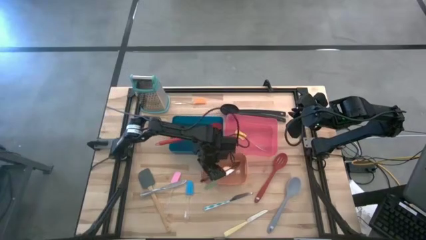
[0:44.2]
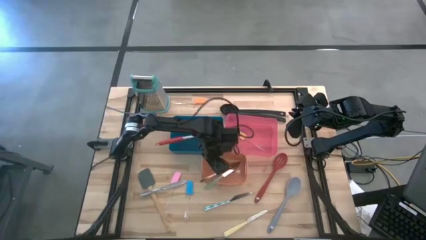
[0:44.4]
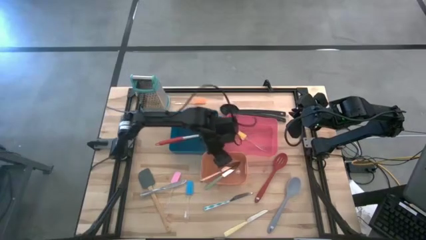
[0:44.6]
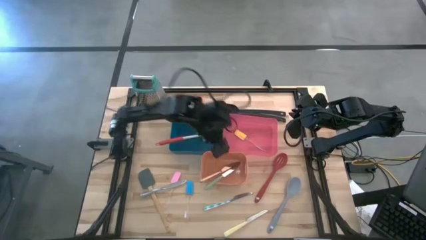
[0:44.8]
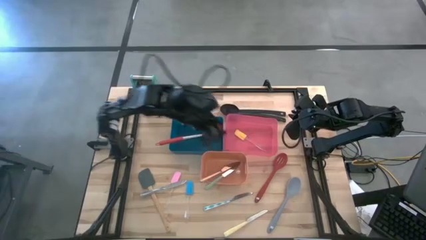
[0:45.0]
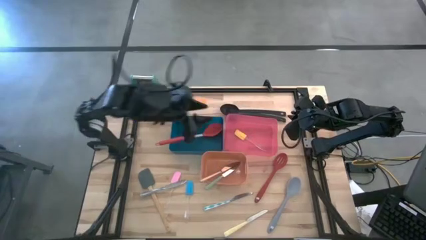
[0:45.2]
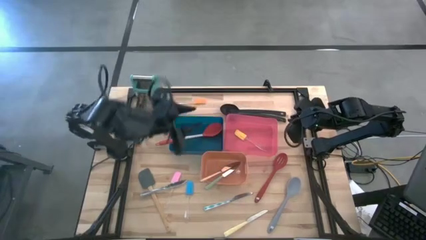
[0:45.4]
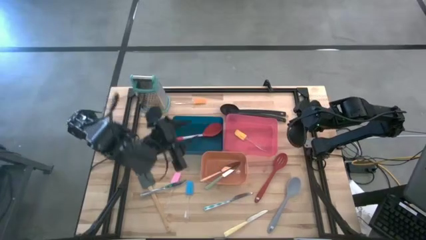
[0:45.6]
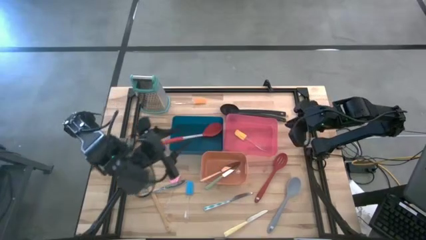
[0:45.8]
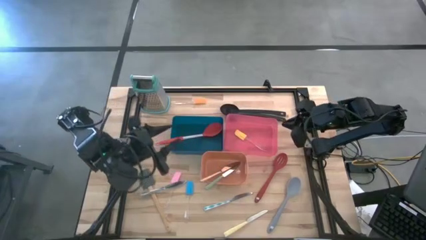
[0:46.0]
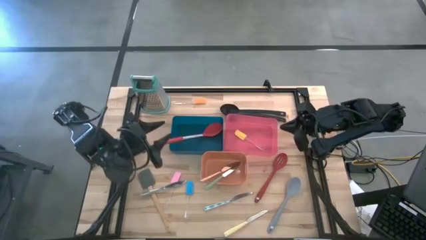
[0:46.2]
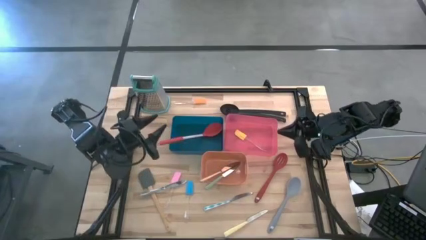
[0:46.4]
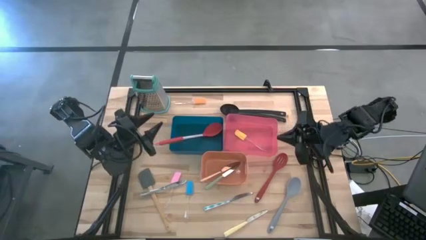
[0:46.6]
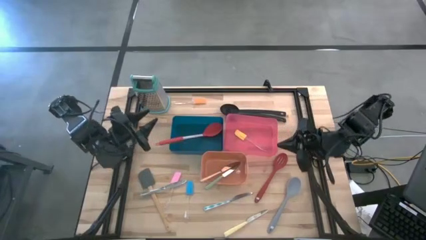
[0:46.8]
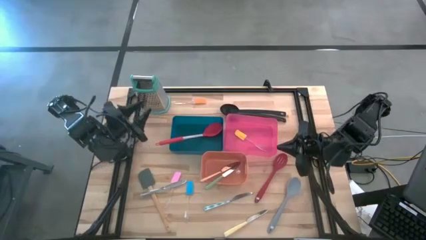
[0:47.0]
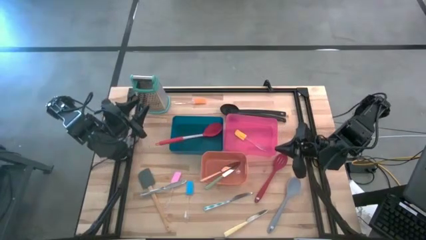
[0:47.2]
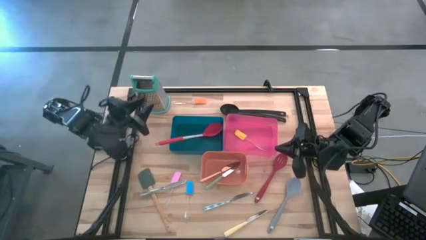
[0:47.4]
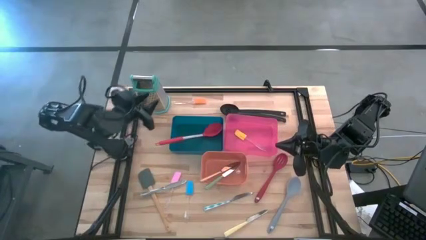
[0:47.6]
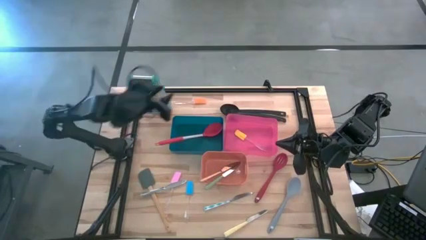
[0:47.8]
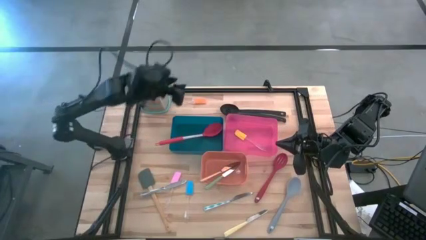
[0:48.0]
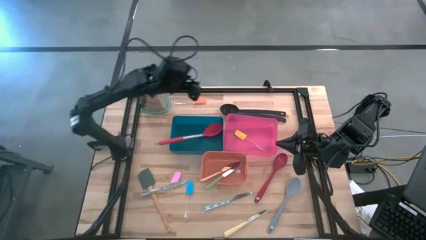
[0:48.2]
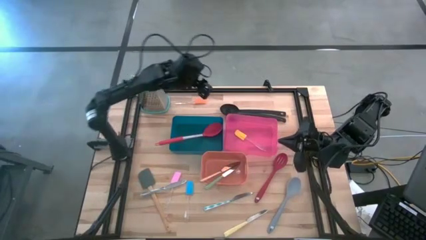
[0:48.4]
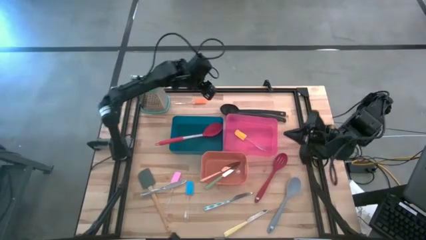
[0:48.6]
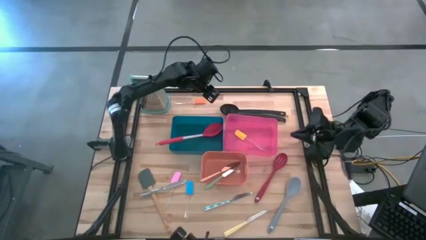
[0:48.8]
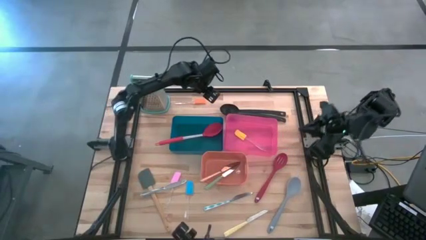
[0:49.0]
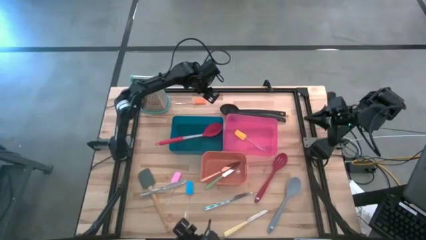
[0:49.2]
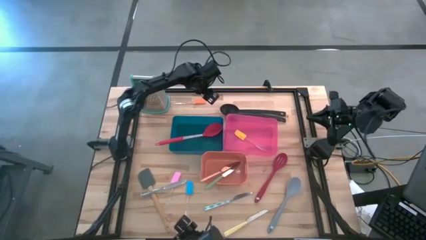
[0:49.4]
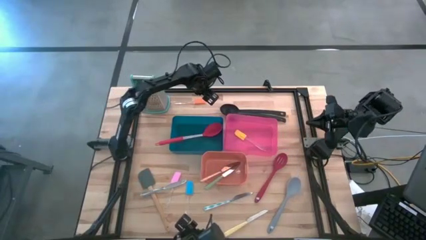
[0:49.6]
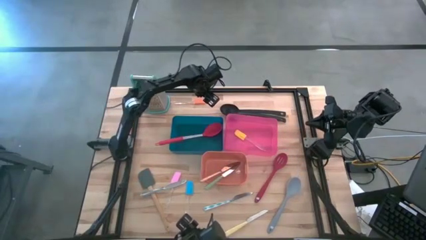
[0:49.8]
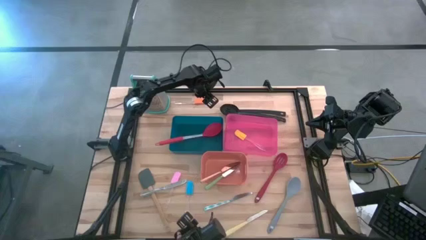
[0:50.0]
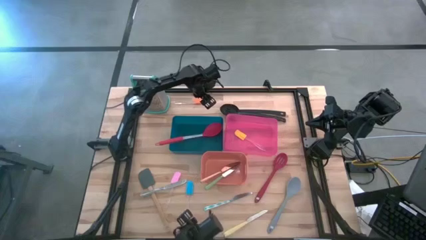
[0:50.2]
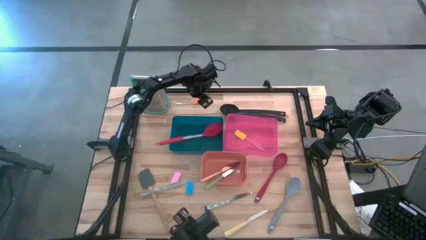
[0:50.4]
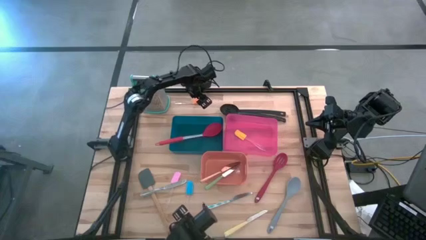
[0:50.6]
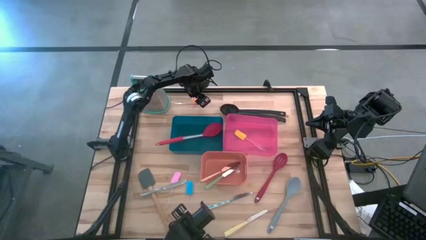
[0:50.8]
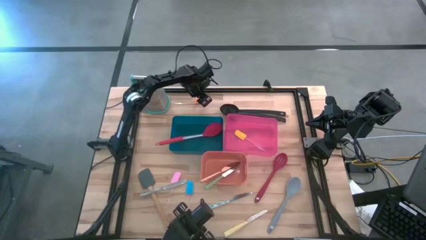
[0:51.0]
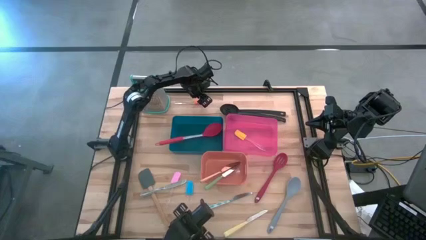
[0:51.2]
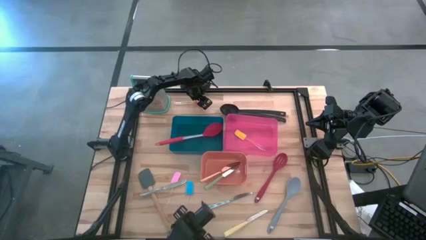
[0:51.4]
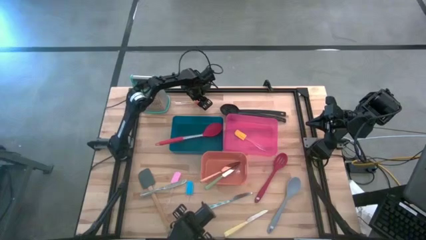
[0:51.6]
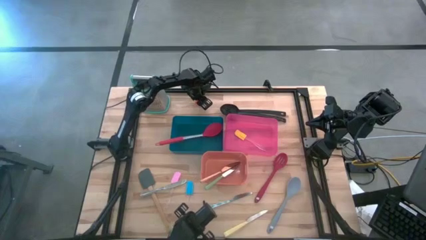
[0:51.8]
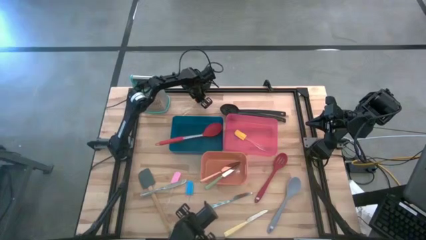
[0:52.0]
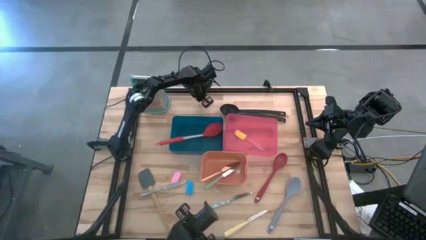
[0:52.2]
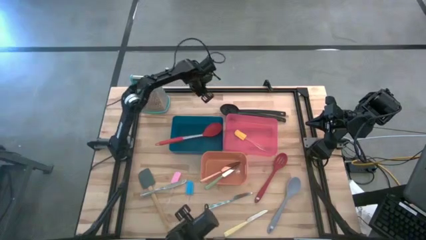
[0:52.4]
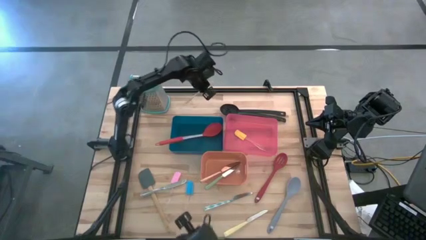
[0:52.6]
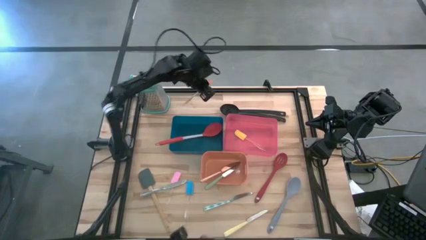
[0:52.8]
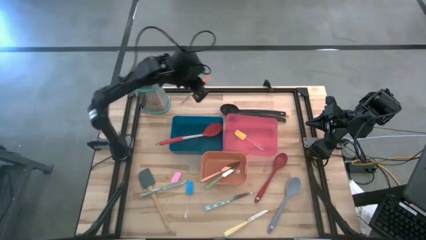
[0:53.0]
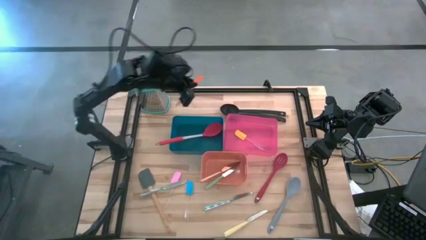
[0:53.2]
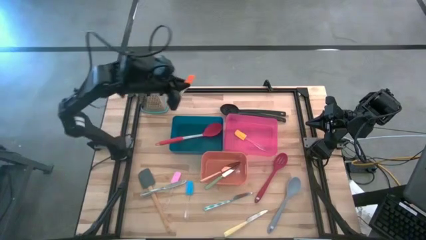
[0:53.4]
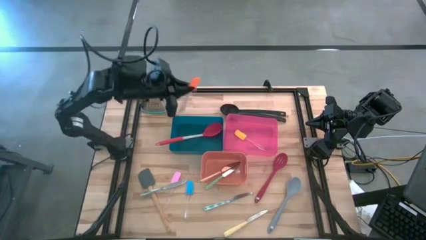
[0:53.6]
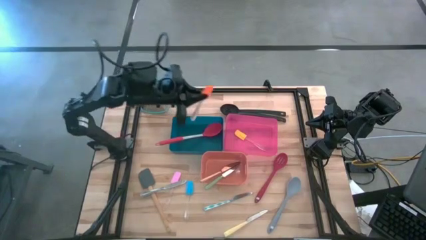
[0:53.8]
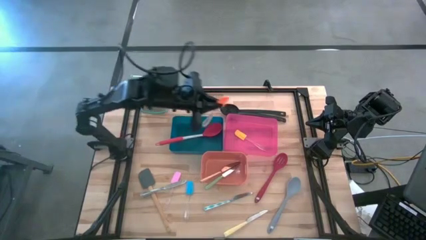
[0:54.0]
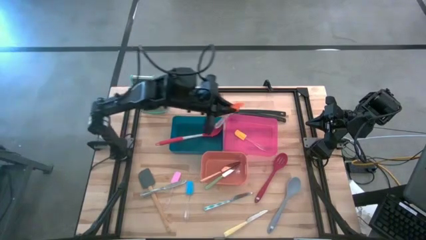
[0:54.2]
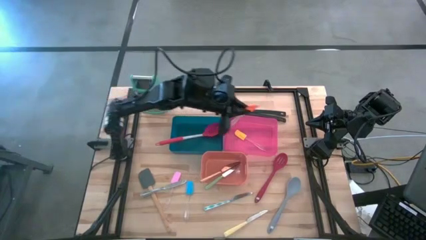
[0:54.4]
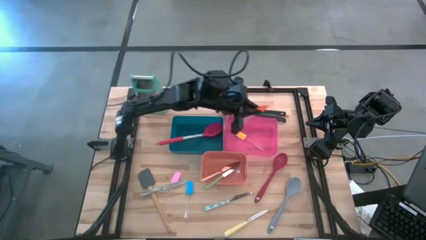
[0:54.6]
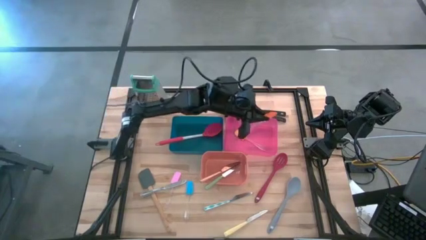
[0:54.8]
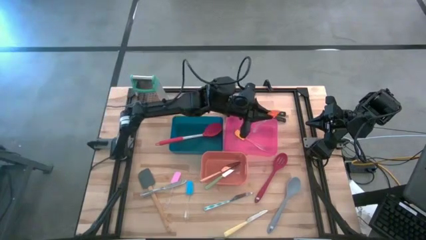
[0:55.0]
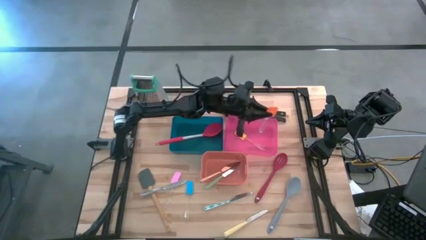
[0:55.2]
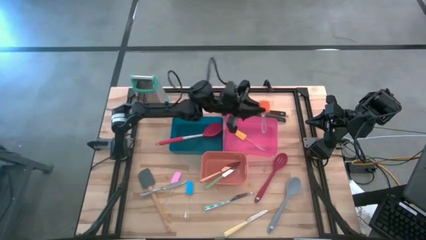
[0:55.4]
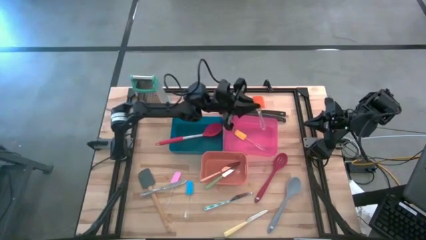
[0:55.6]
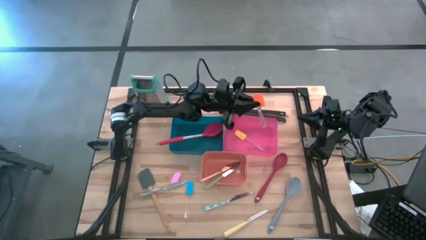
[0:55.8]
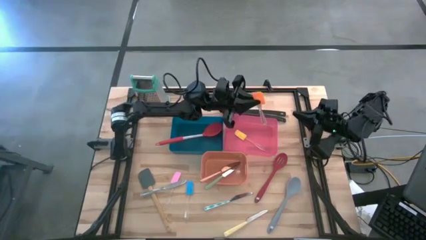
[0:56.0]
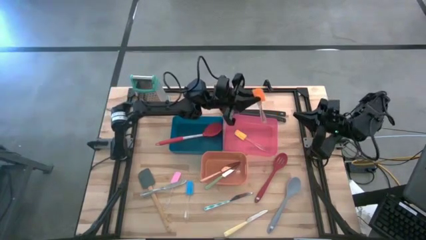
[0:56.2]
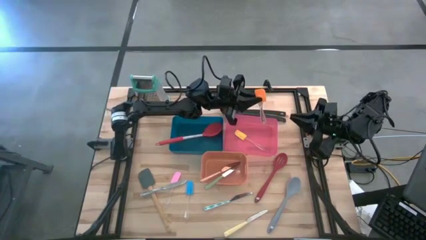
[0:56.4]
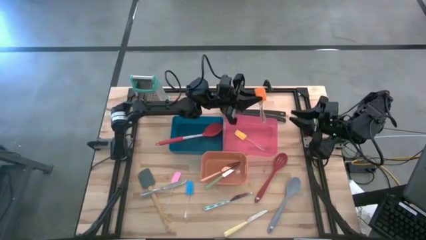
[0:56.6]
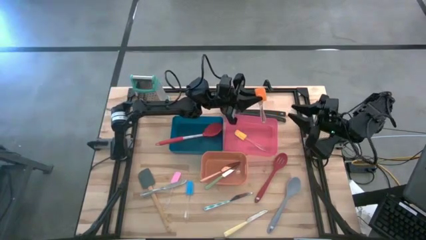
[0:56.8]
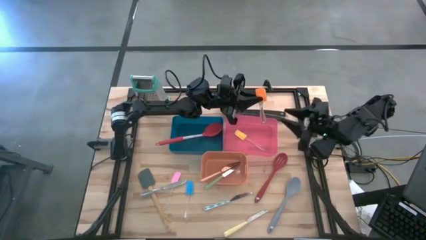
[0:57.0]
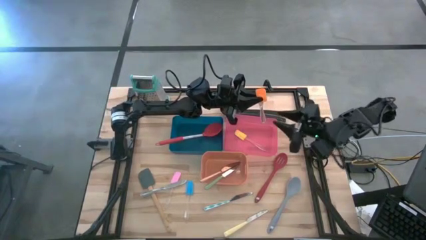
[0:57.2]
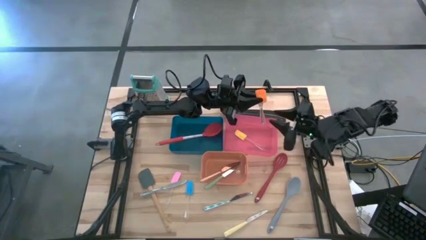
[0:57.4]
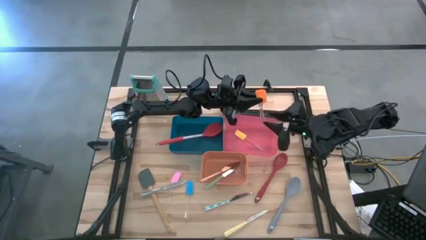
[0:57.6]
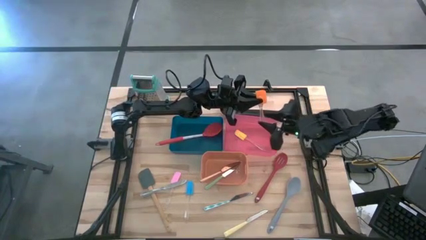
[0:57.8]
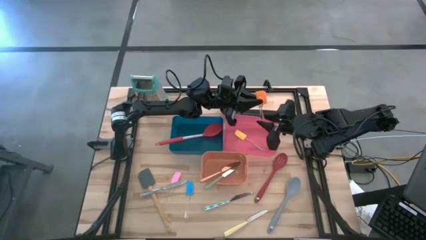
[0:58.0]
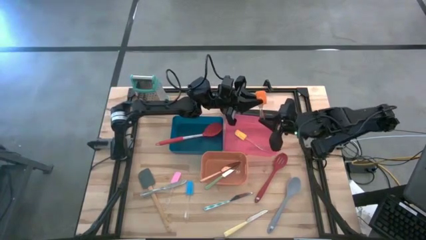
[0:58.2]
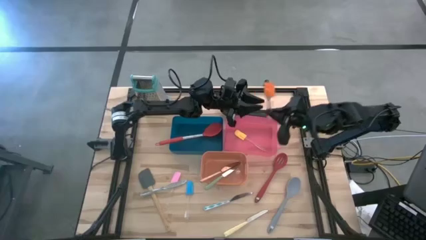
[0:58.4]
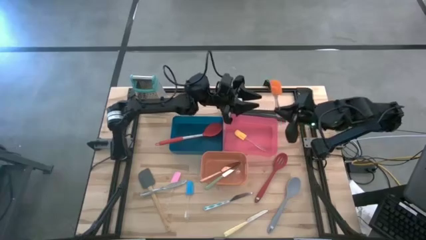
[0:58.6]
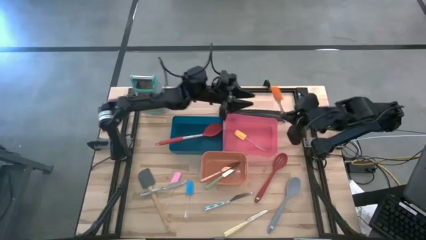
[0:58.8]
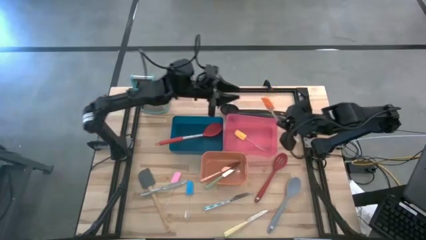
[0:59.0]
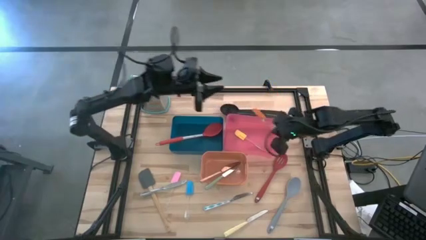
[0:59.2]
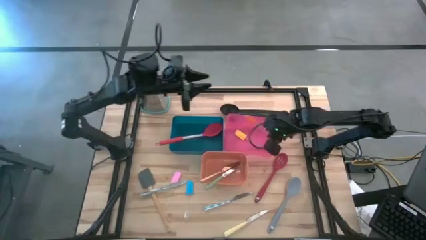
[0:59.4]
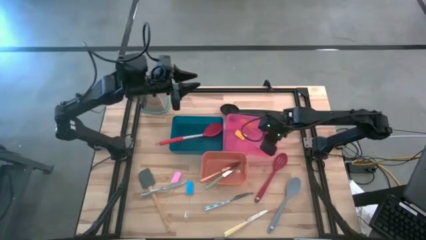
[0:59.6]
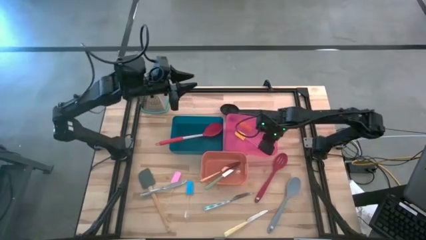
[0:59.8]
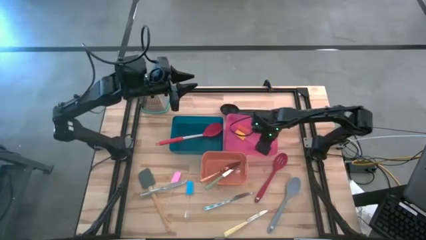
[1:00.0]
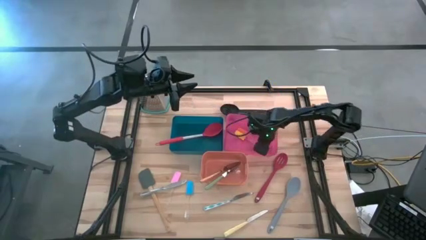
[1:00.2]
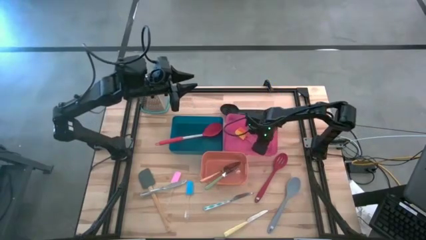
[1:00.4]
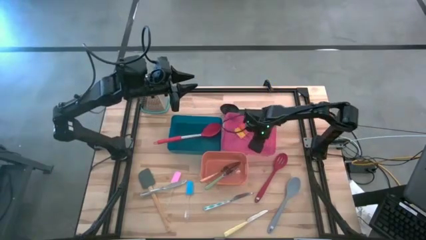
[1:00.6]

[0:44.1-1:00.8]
Task: Pick & Place Kitchen Items
Put the orange spatula into the red bin
